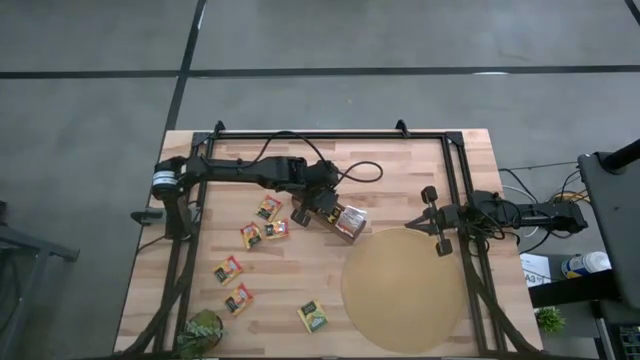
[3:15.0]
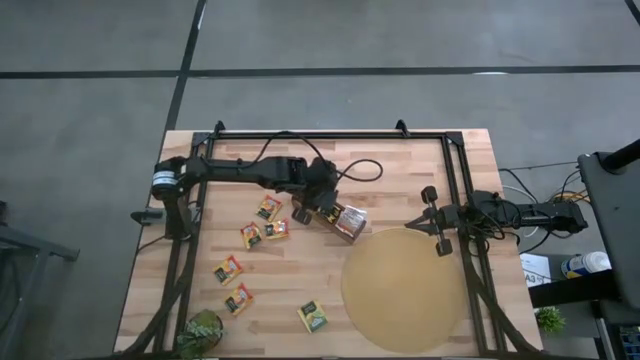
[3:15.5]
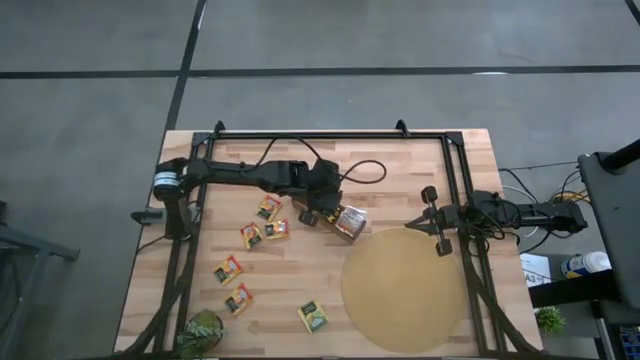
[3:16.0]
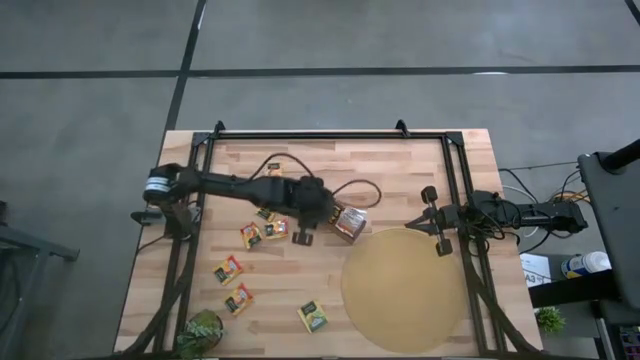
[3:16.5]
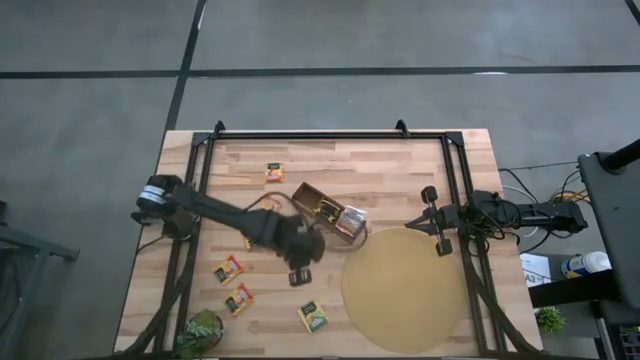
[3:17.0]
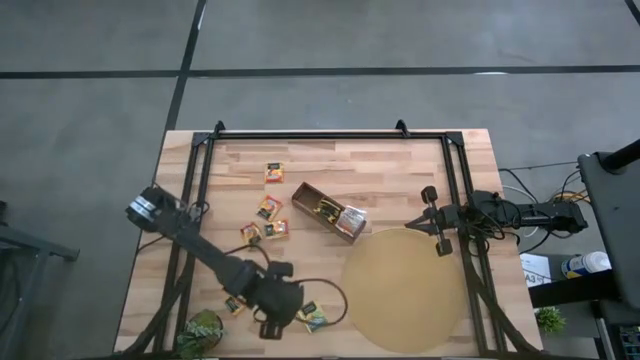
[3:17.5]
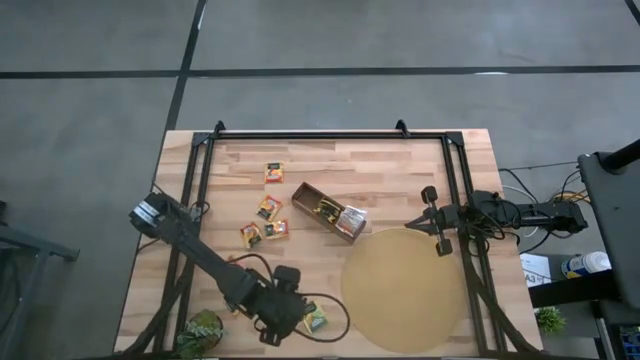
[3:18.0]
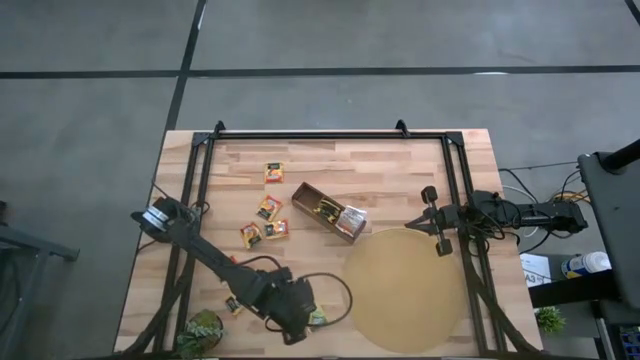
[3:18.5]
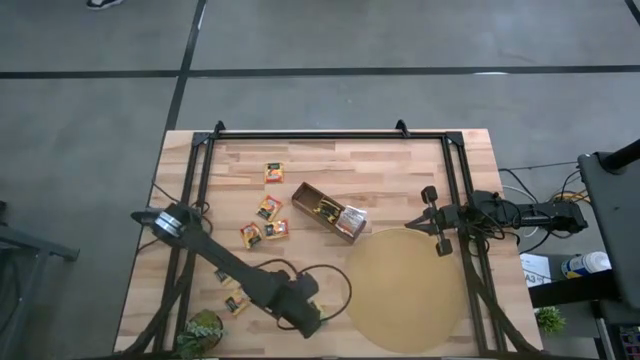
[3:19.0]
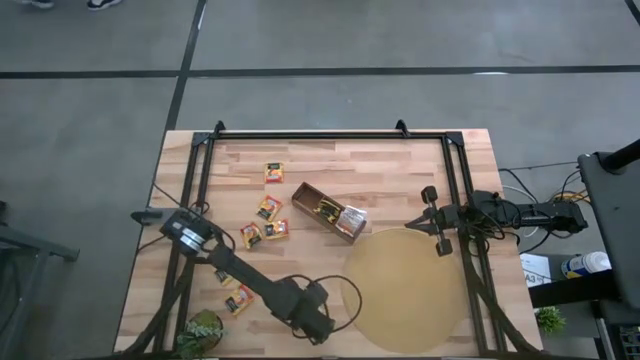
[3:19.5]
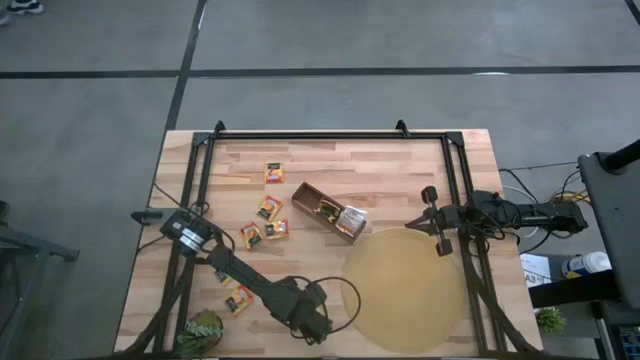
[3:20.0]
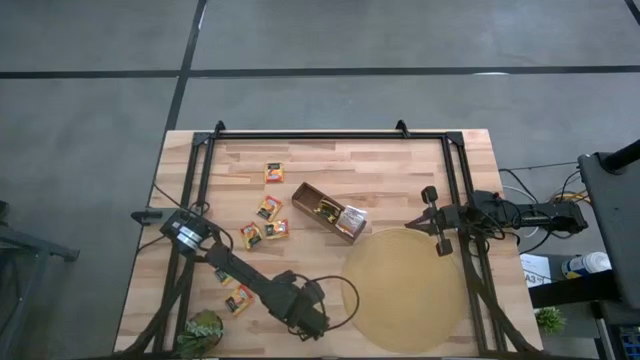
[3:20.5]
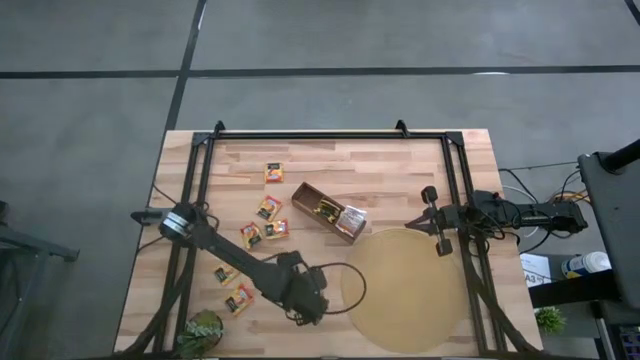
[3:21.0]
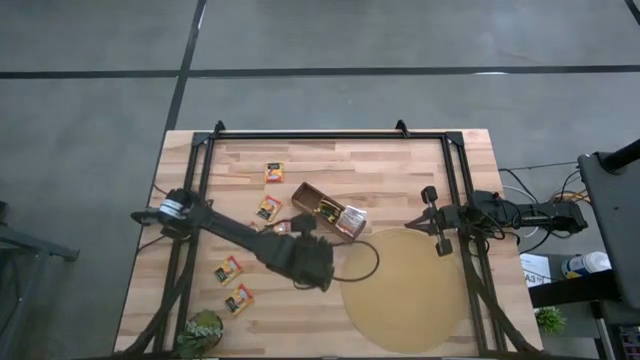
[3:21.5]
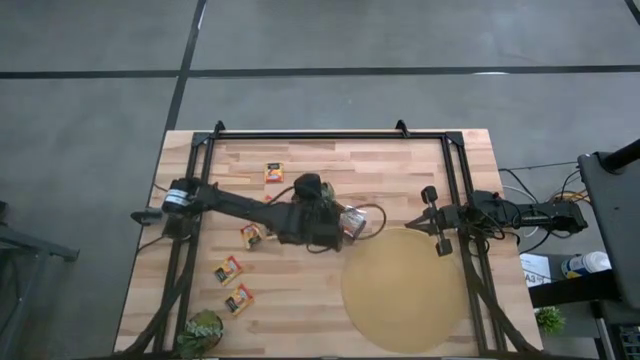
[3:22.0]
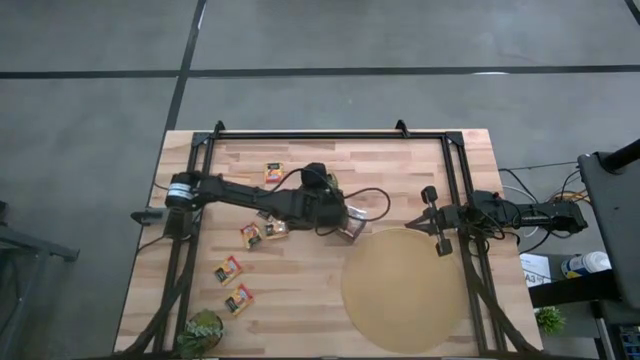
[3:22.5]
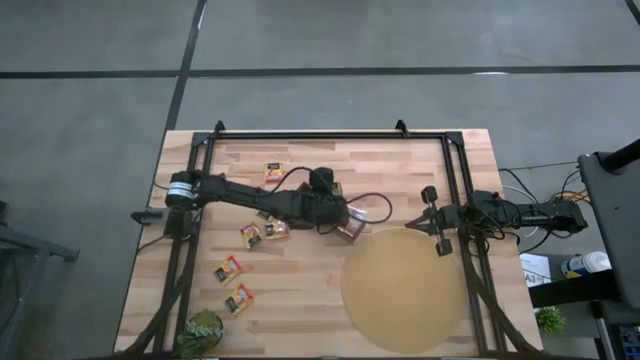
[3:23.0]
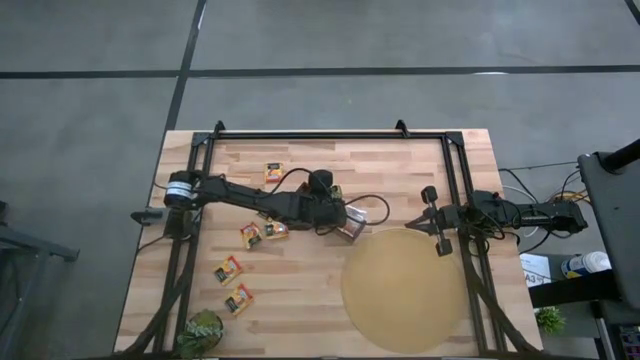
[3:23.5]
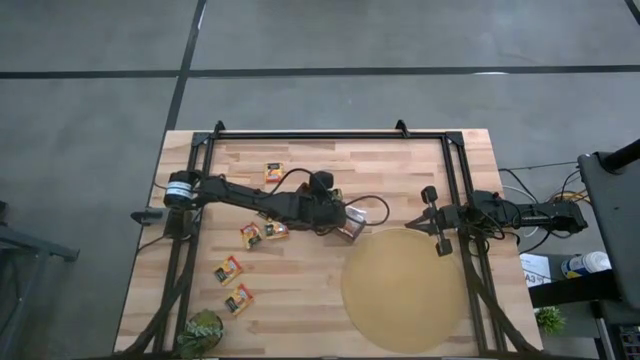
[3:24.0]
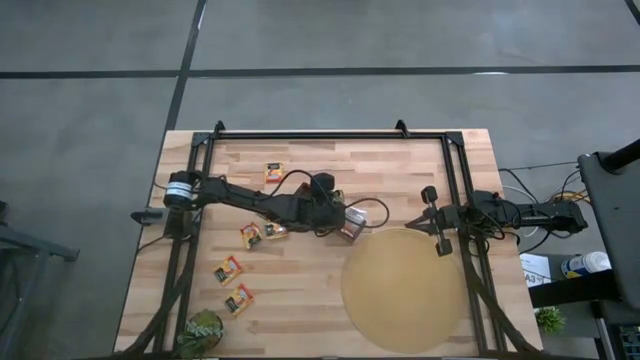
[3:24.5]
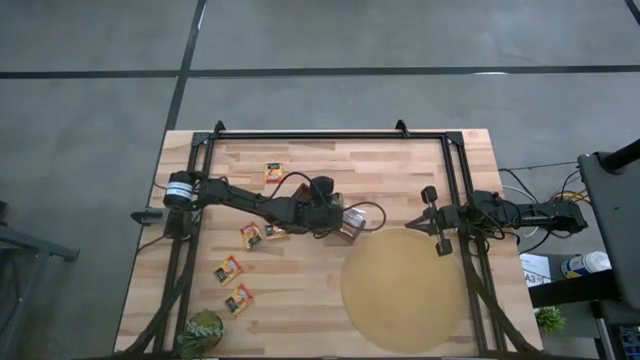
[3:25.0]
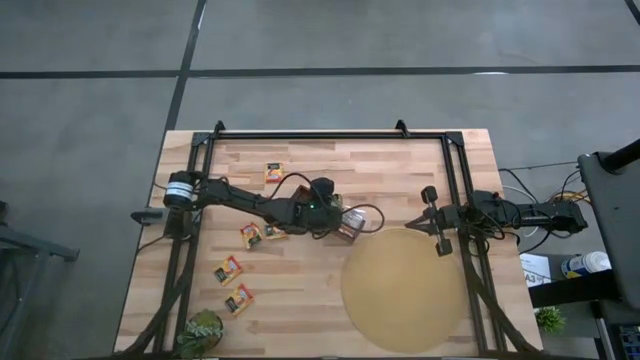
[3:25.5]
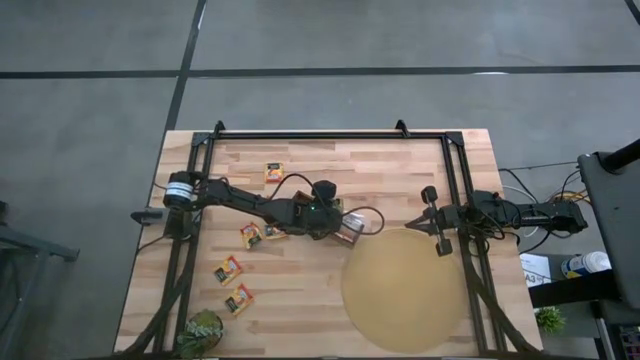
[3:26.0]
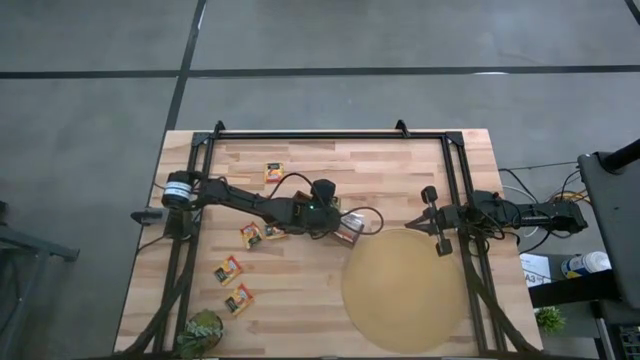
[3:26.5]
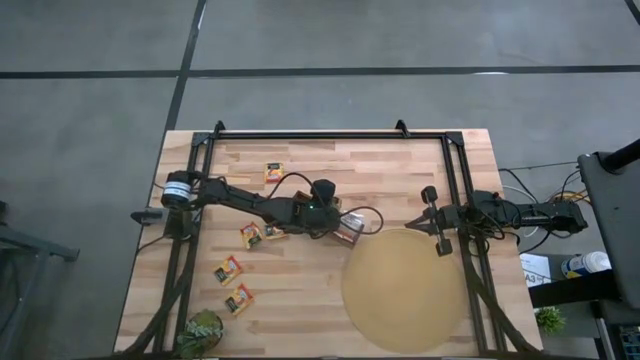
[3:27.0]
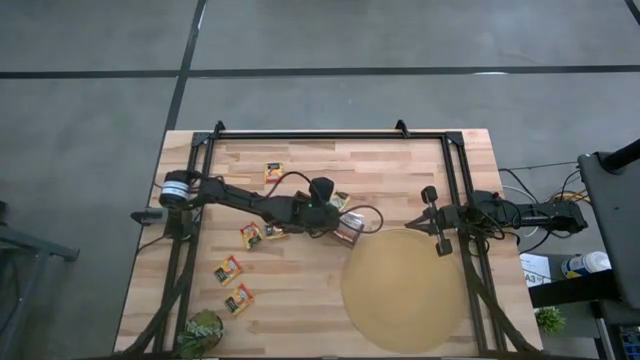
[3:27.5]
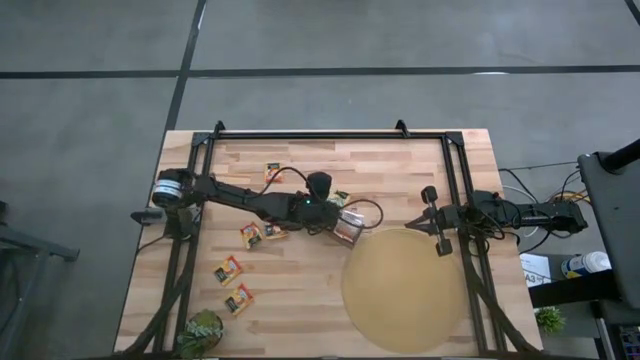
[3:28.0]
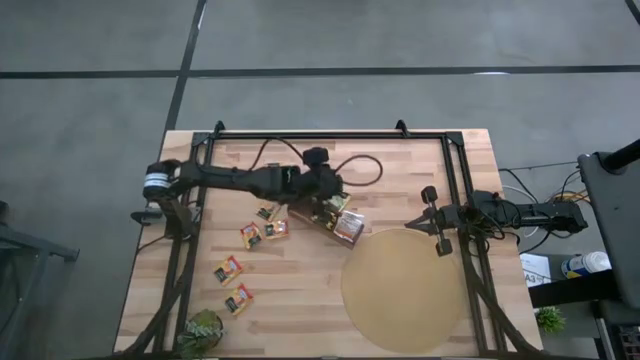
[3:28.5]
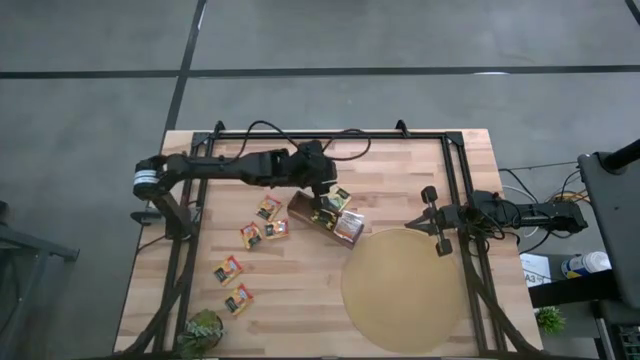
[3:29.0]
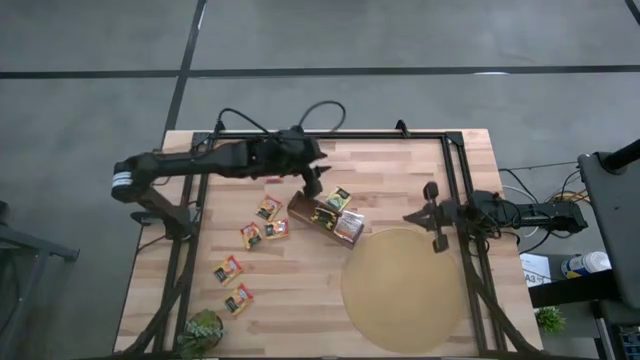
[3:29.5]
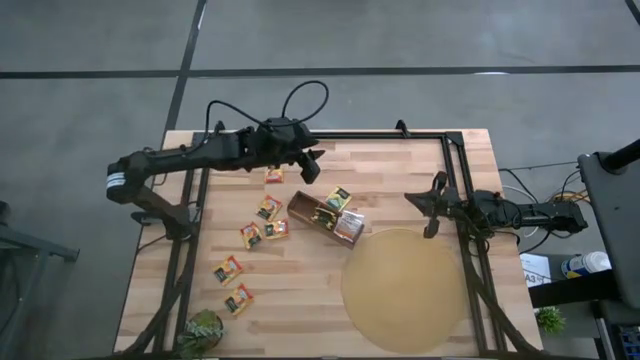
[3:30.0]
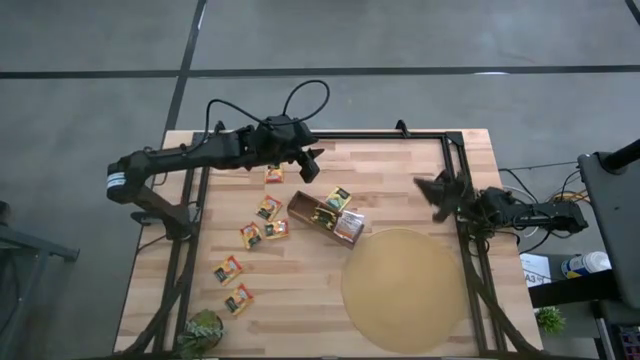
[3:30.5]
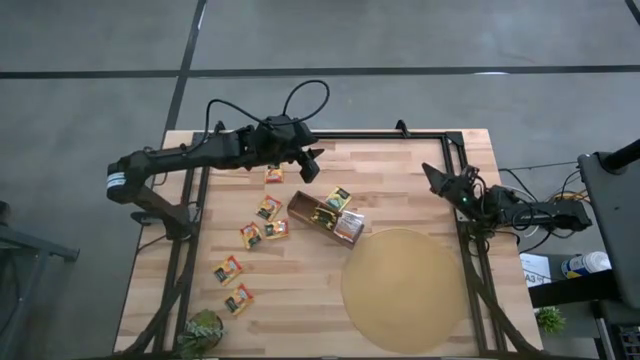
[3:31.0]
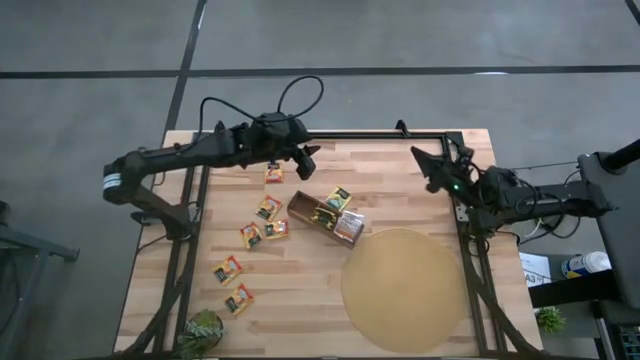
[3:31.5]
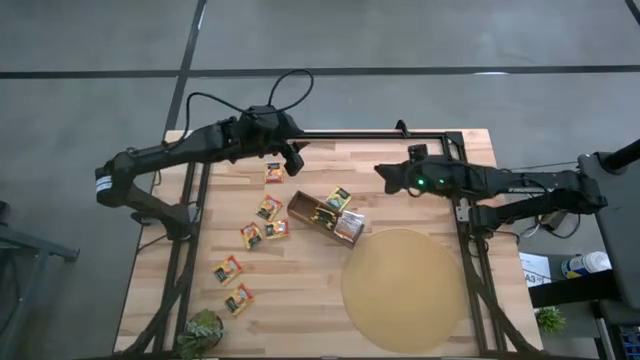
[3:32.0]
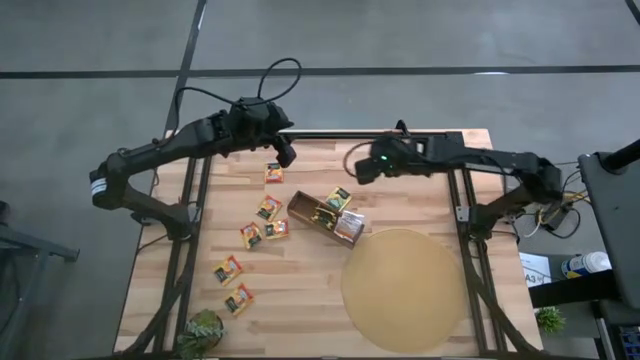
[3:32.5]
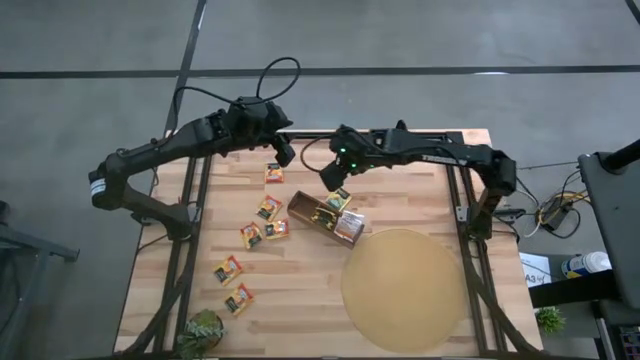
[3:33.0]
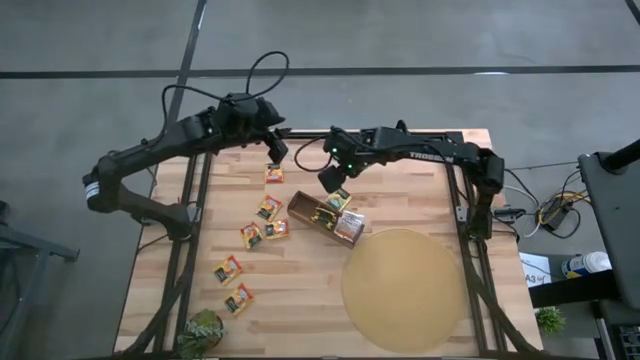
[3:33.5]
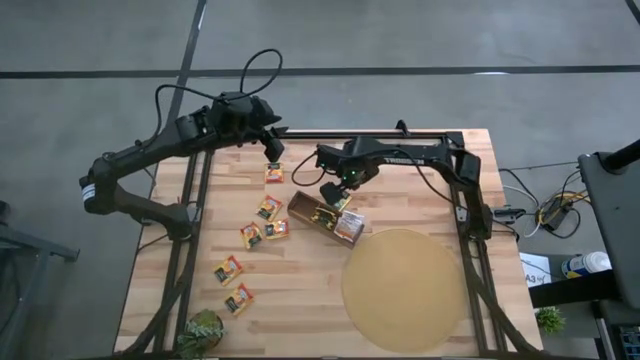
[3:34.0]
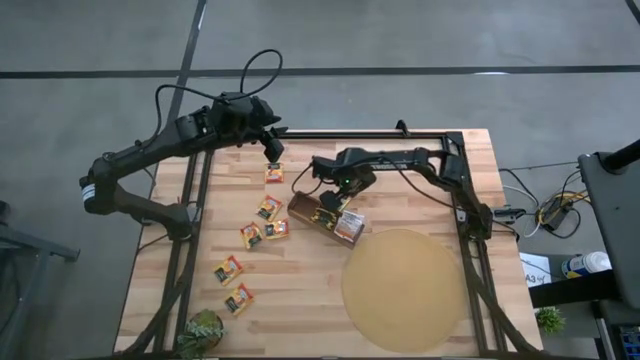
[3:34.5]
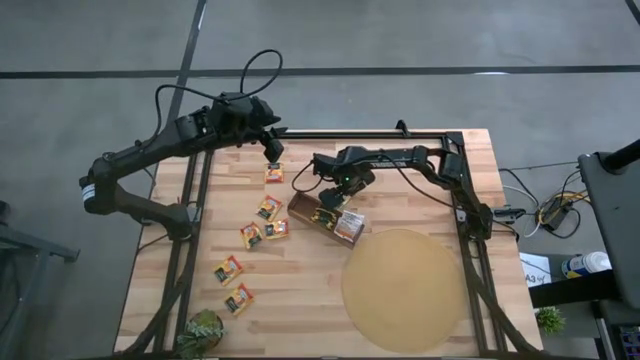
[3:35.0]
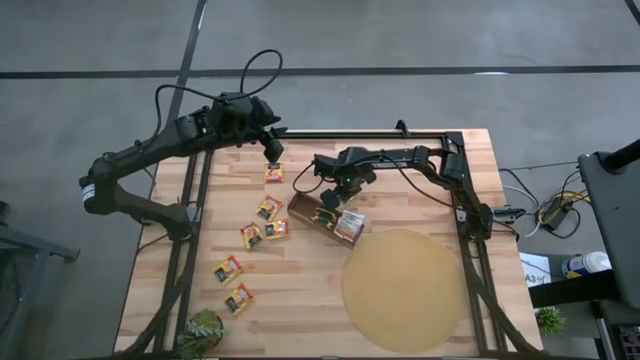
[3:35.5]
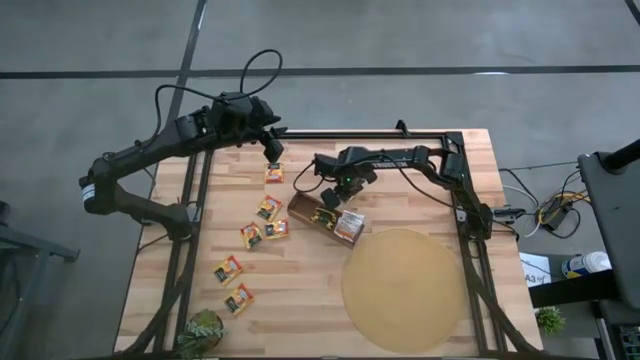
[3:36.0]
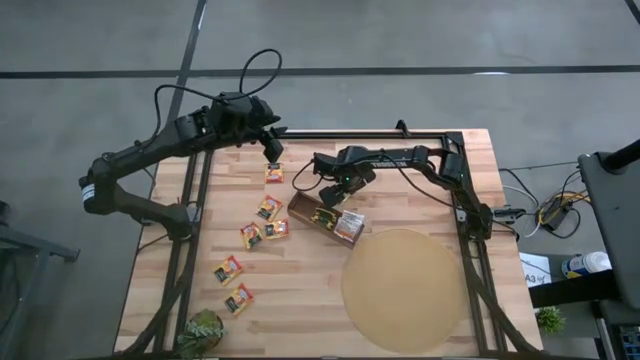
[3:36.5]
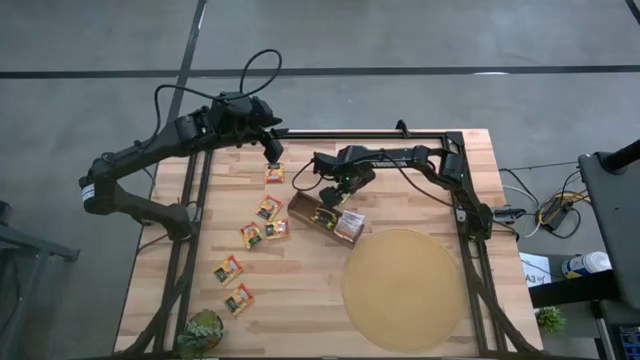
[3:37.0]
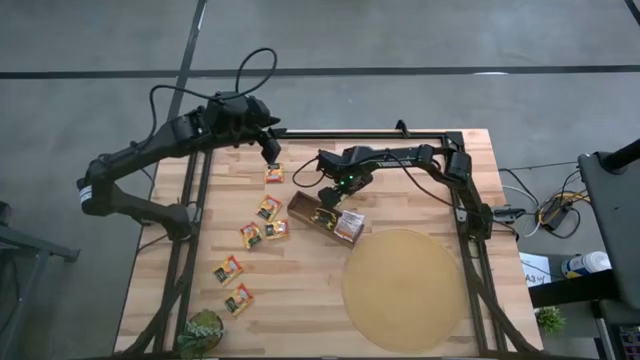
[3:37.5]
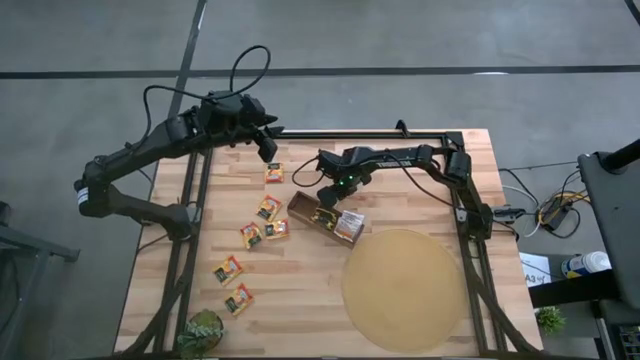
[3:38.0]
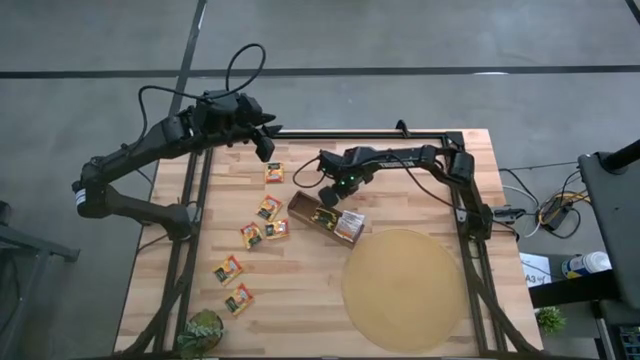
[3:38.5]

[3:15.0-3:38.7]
Task: Pick & Place Tea
Put the yellow tea bag into the middle section of the wooden organizer
